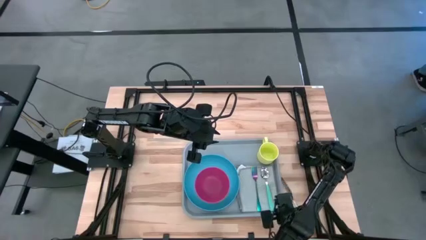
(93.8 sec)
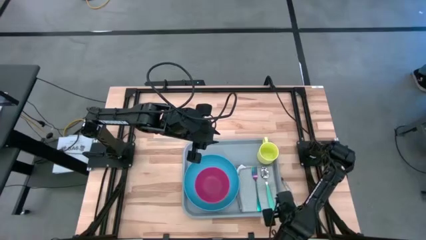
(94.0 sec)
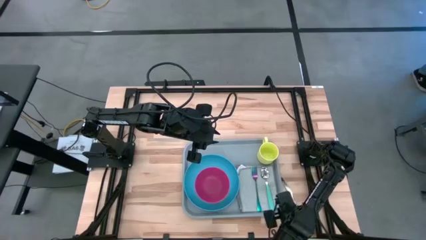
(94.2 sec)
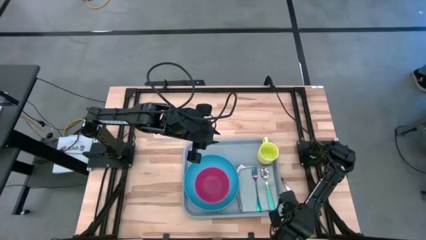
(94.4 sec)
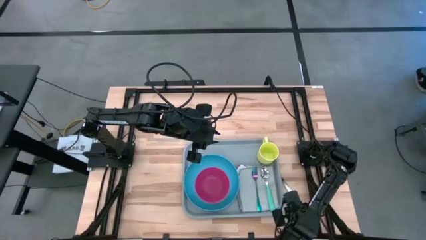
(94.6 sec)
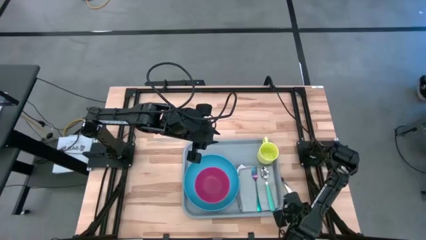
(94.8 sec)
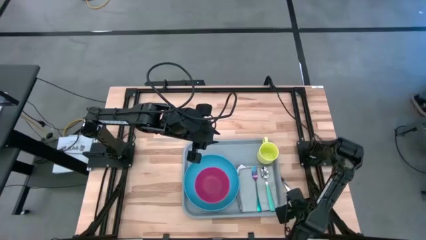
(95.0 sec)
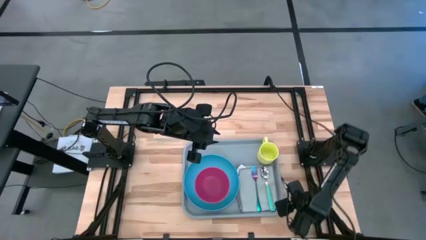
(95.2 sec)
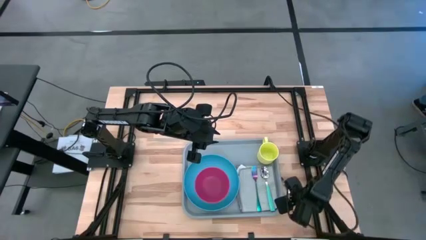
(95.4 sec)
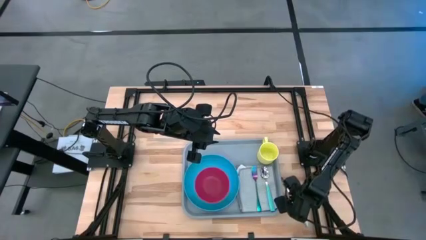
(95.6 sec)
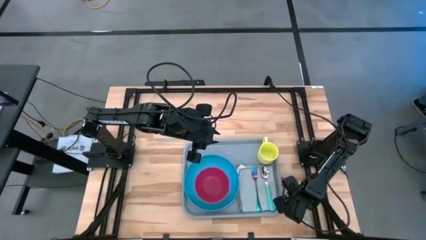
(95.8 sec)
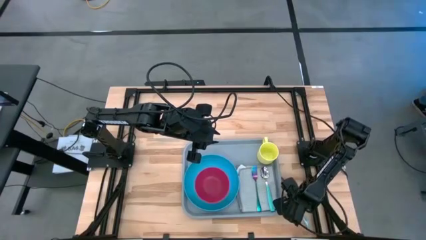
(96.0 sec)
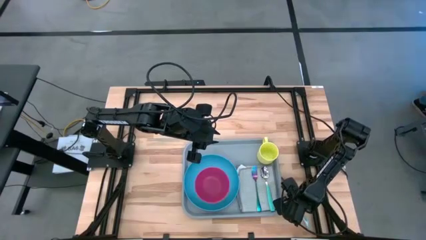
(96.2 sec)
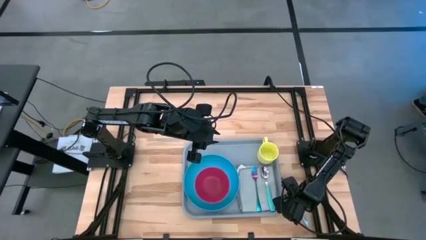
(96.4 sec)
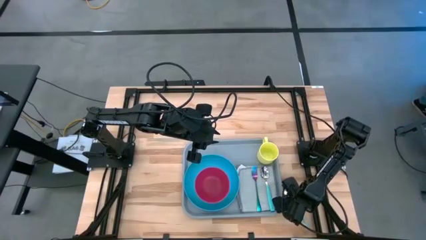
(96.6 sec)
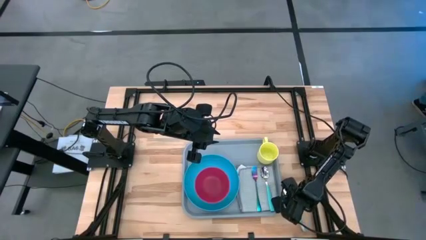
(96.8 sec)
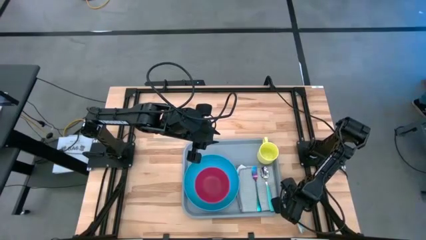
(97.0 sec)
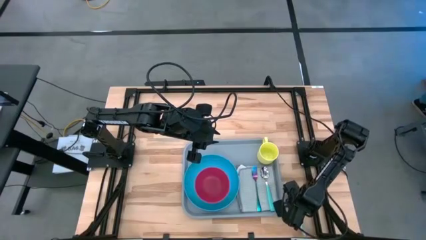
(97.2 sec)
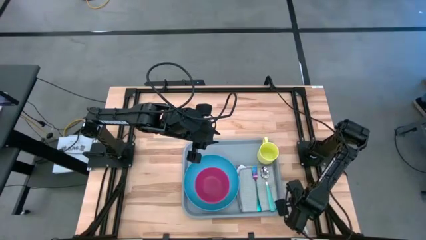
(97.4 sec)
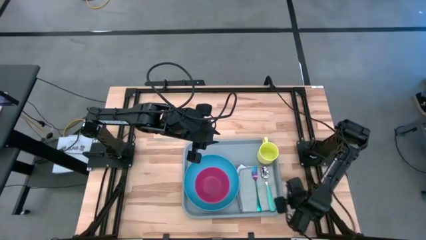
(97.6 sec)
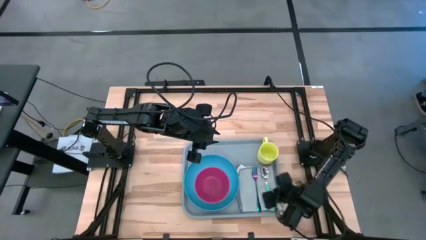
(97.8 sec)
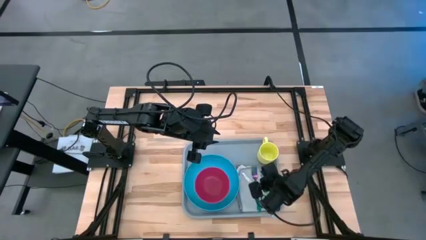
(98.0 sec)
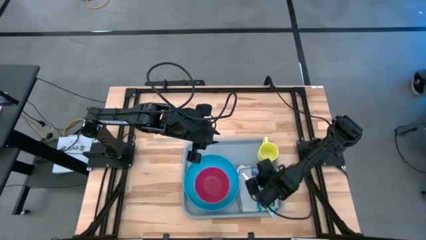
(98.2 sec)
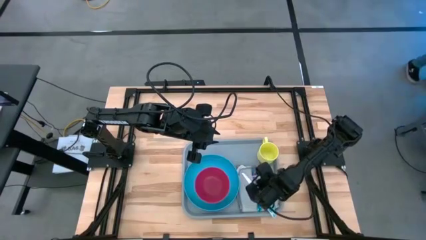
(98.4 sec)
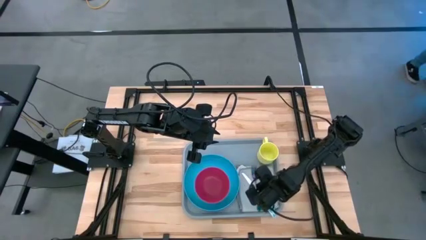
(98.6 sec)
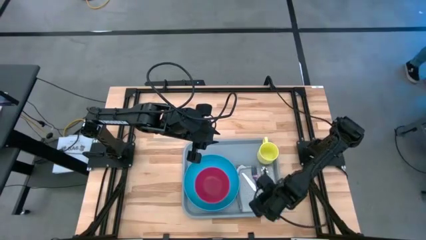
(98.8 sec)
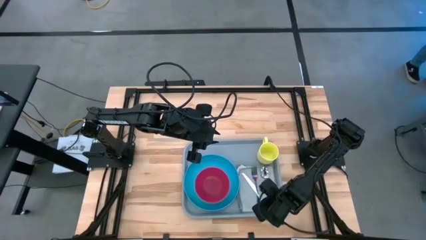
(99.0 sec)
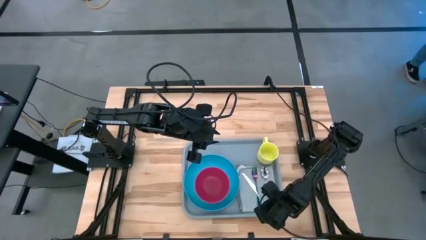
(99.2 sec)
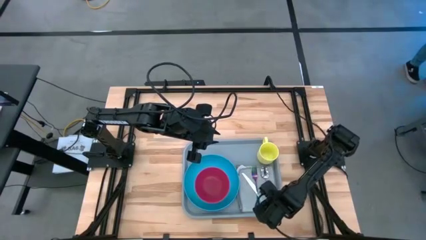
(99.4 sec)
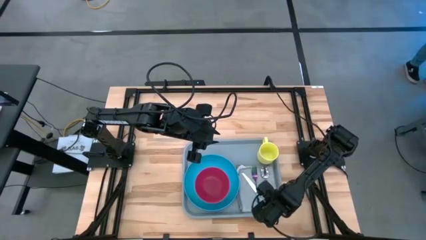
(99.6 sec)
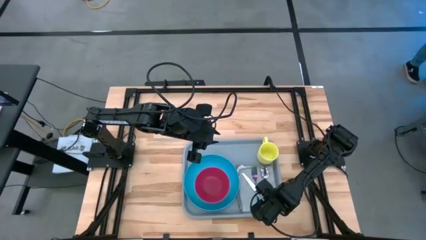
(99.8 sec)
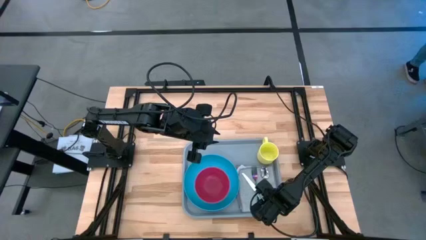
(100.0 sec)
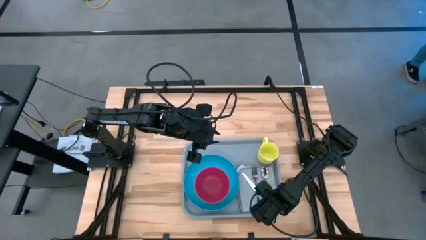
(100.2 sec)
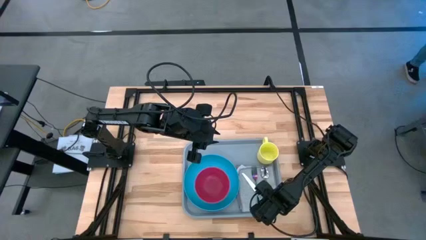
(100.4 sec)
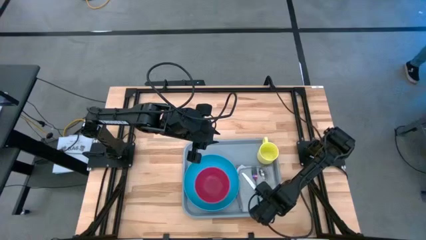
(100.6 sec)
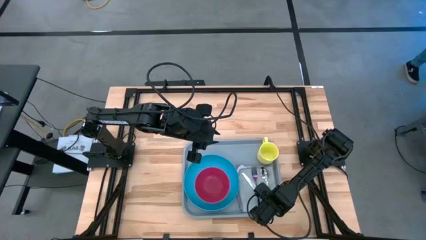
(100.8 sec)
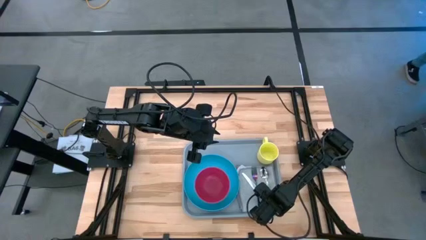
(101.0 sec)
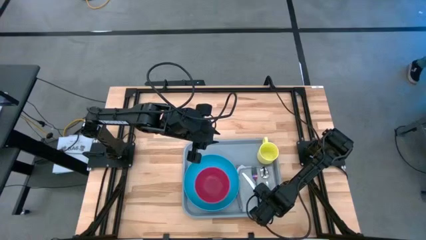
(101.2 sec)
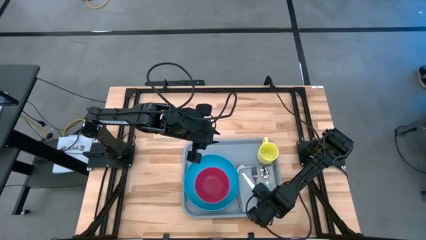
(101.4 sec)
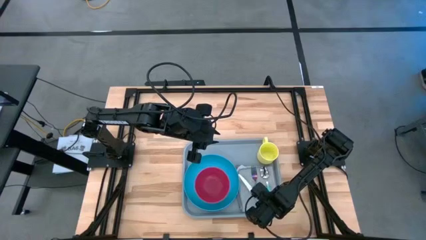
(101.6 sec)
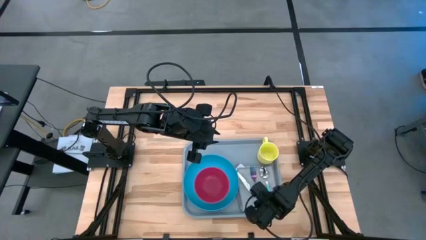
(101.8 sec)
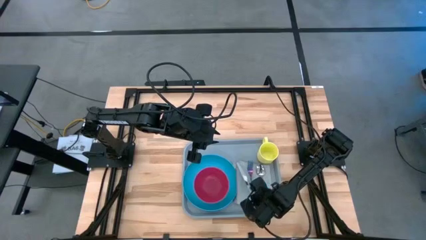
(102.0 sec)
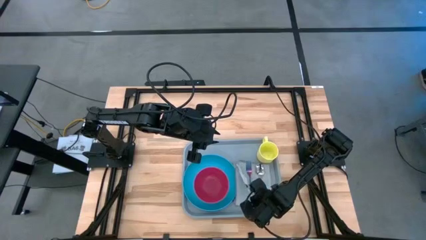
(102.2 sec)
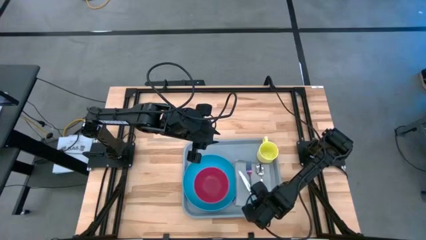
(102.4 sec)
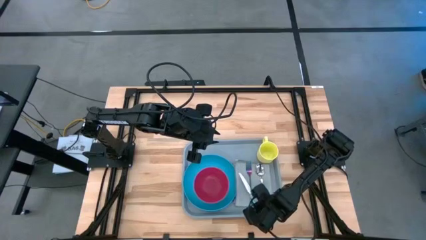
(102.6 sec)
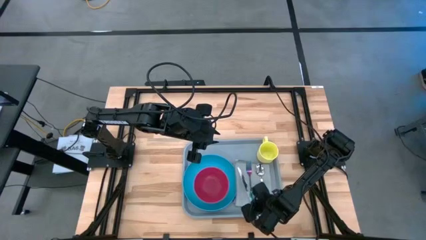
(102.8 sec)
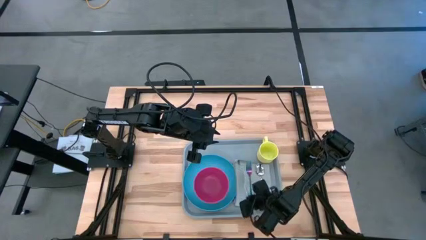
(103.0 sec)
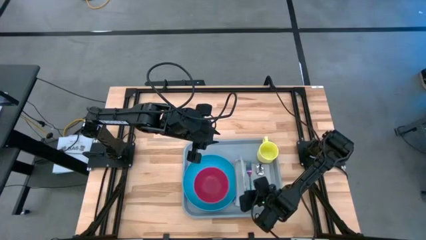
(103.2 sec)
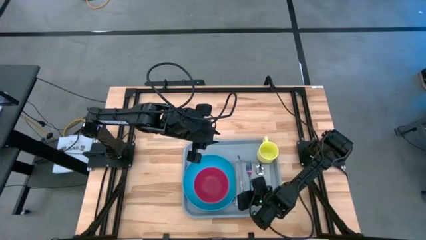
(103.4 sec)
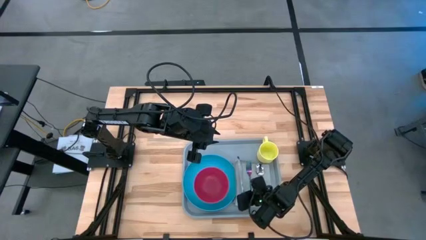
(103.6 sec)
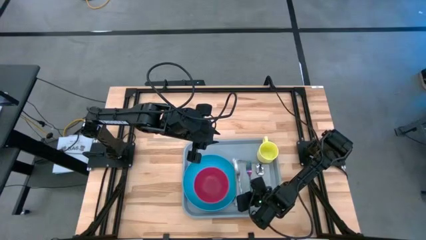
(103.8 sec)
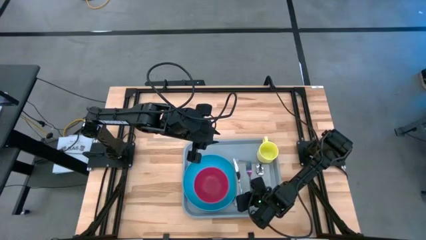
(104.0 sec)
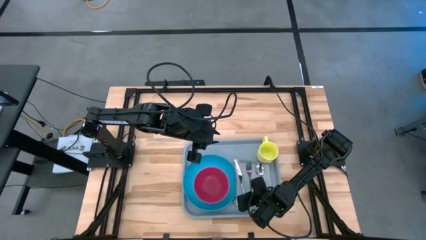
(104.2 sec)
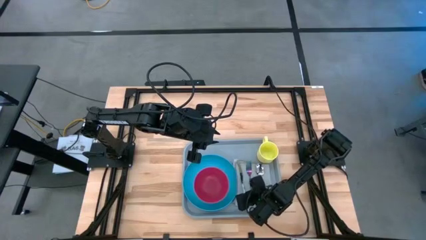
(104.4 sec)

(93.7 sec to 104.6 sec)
Task: Set up tray
Put the blue knife to the left of the purple fork on the gray table napkin

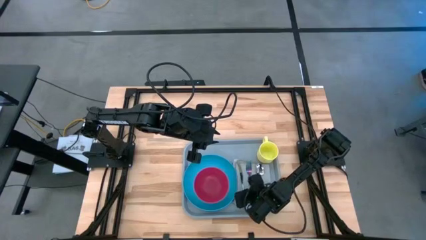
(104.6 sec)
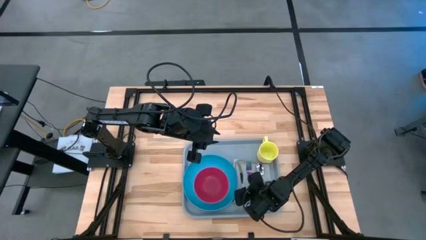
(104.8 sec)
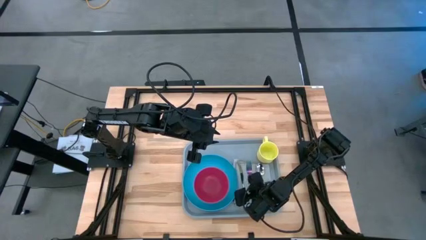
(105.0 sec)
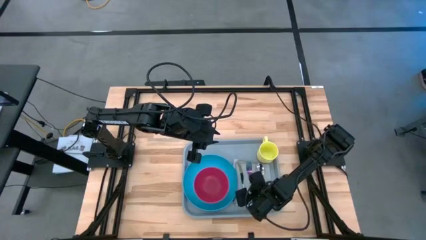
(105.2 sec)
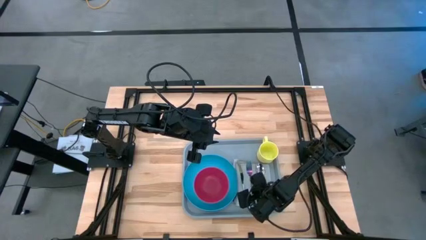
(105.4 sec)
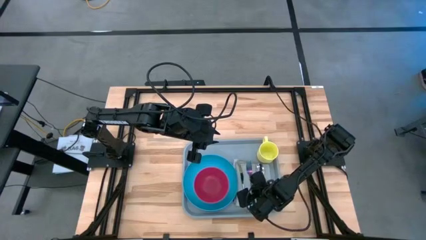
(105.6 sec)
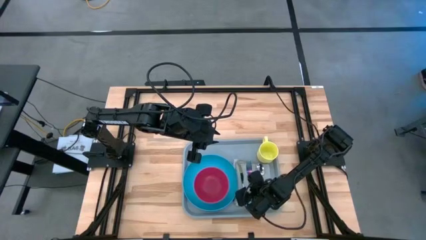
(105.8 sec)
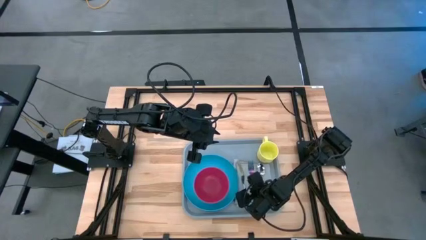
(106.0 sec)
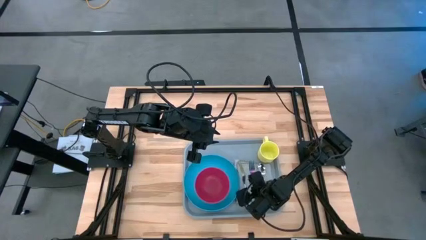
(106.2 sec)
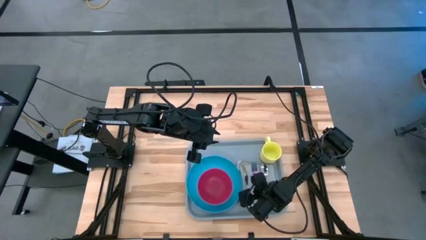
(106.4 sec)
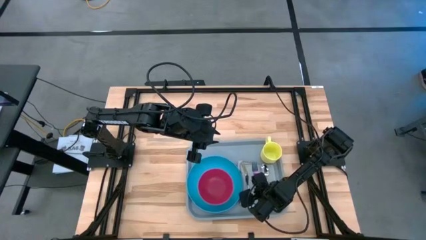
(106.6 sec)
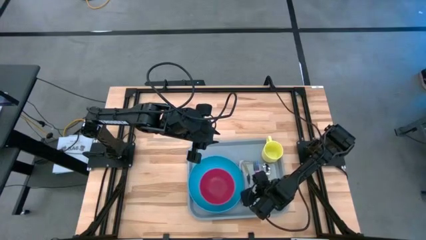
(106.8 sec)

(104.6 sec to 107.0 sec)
Move the gray tray to the right
